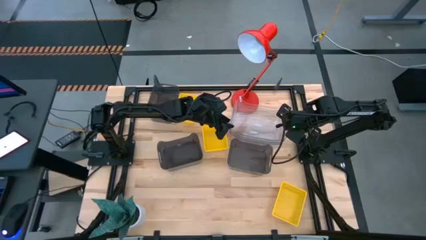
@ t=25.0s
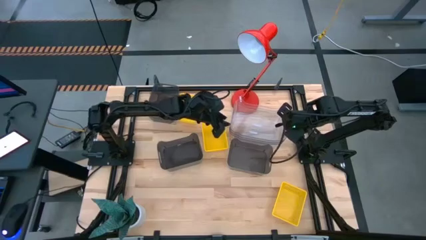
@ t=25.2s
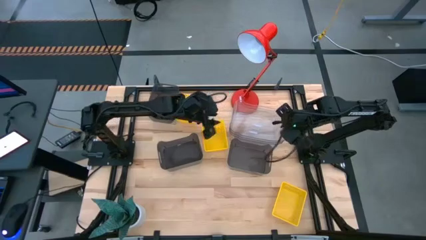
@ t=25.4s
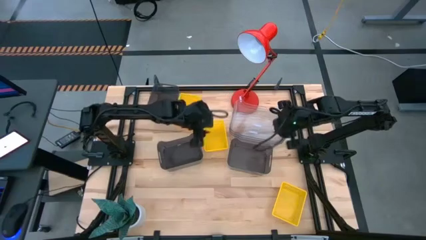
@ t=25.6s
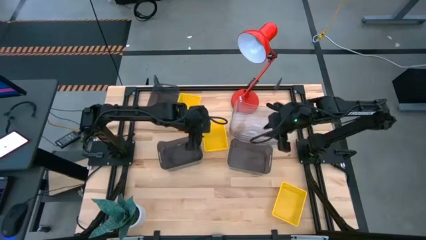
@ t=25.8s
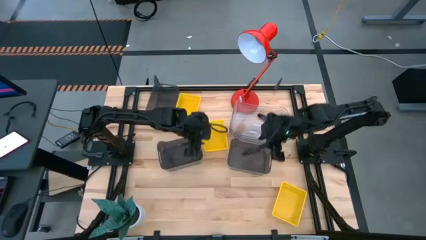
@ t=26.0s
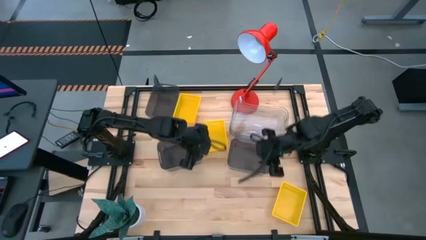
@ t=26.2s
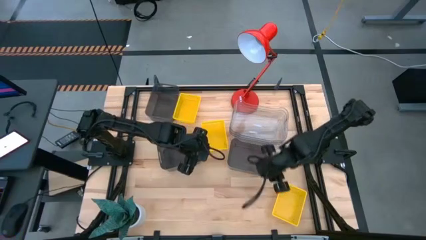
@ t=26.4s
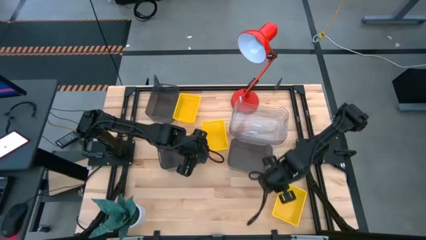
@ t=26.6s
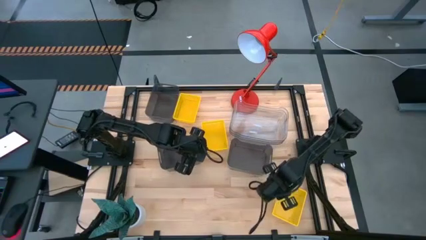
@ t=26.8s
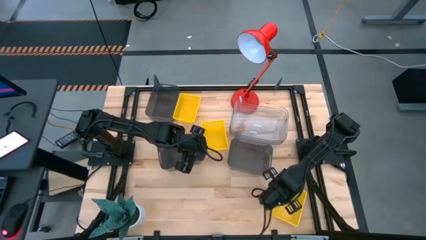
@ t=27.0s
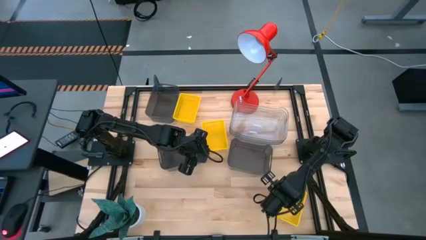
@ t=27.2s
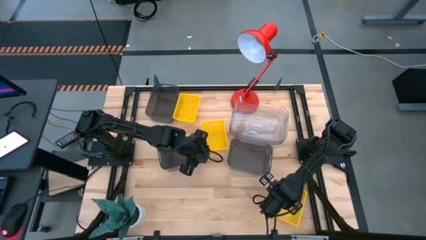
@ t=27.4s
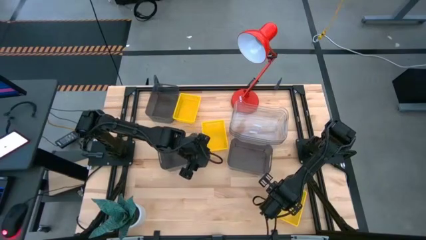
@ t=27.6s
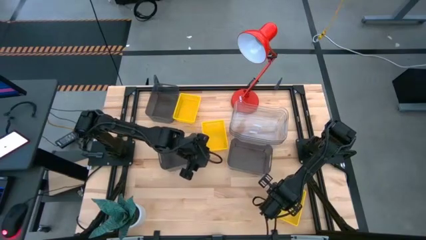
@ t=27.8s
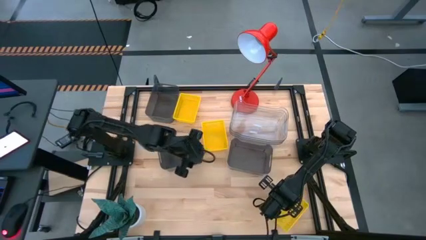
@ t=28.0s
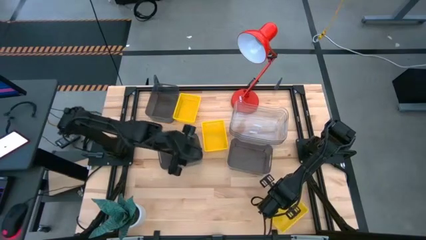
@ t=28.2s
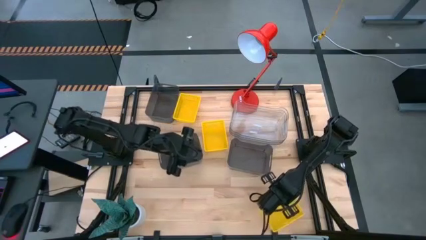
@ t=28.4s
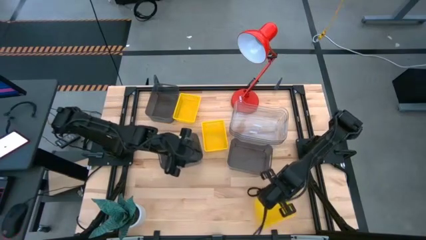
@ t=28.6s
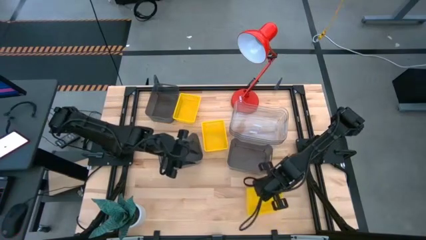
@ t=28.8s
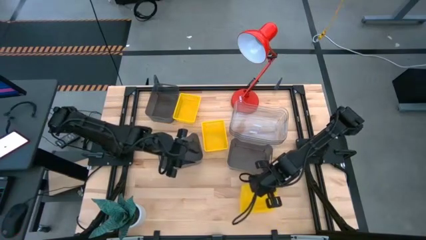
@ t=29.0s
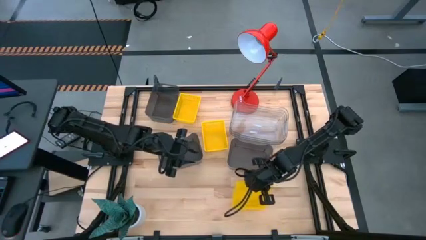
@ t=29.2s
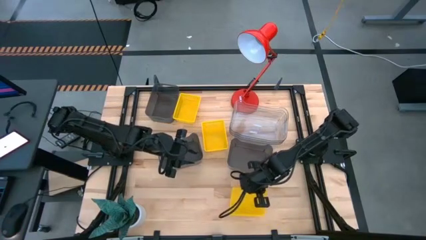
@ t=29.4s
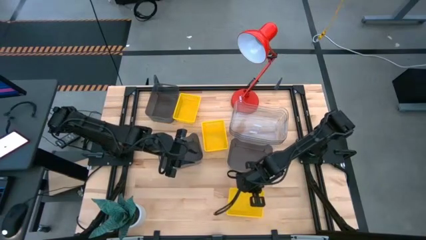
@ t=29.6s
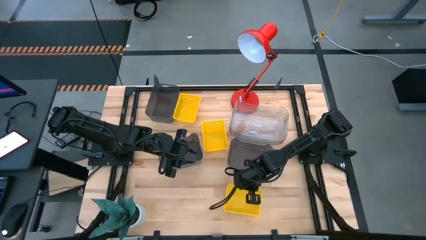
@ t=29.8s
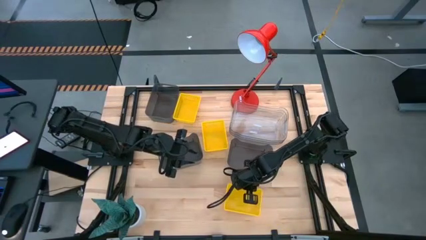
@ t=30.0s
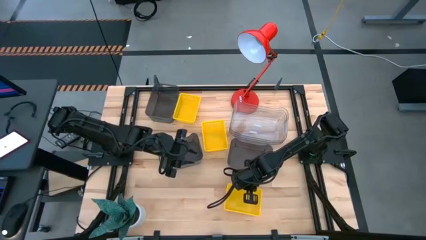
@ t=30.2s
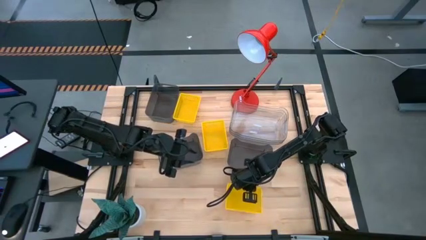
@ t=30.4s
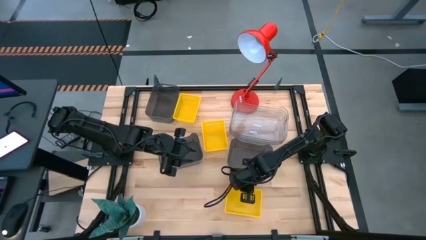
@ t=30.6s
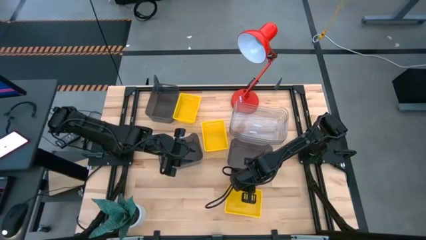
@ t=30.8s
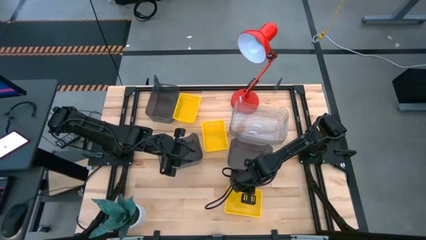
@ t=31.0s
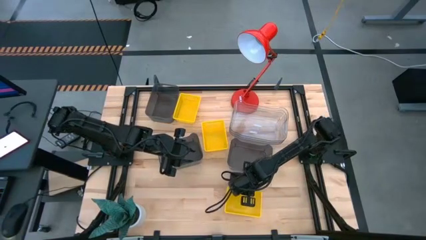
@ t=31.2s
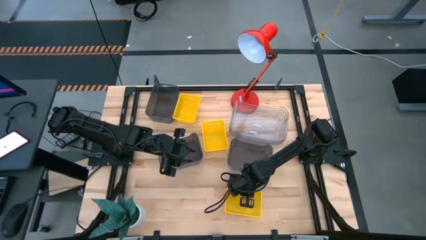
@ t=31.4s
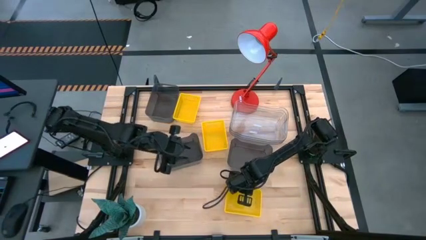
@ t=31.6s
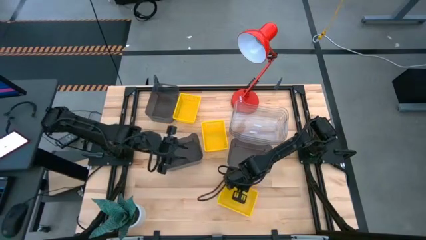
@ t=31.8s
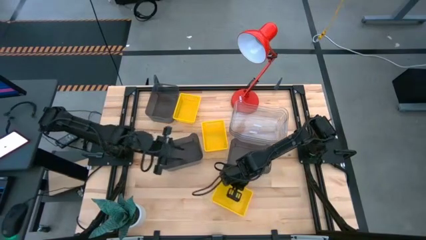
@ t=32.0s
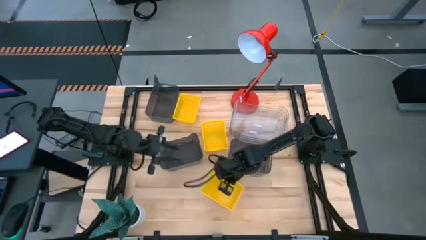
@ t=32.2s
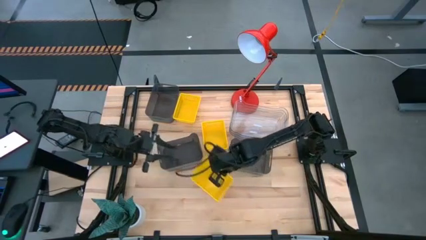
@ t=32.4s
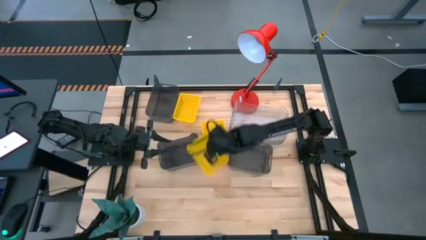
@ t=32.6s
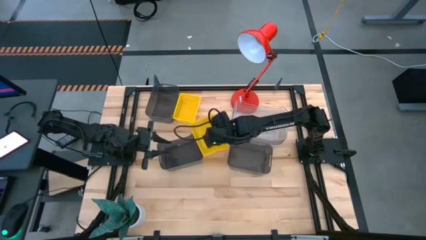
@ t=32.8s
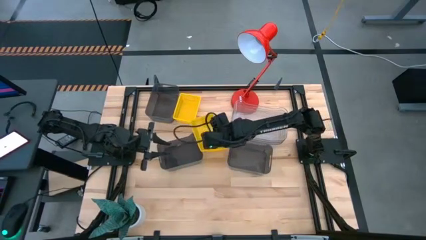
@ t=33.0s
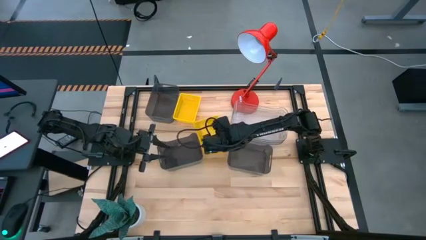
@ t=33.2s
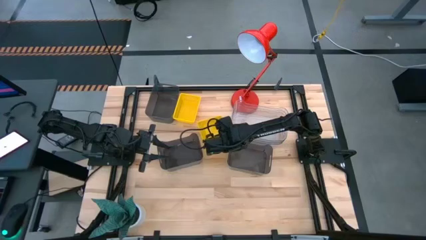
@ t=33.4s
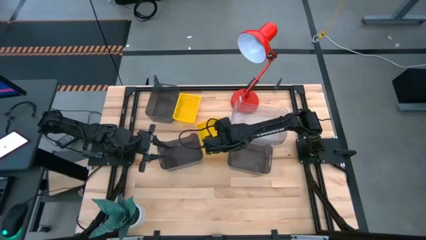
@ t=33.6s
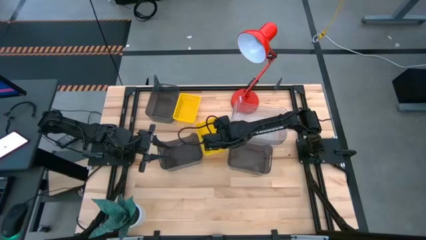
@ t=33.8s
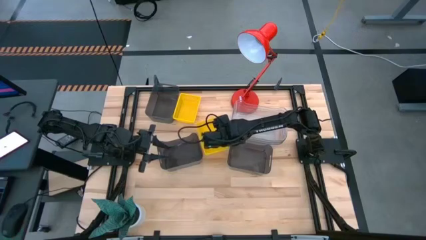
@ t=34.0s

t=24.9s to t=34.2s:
Stack the bottom yellow bin on top of the middle yellow bin

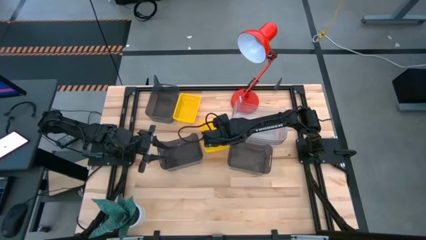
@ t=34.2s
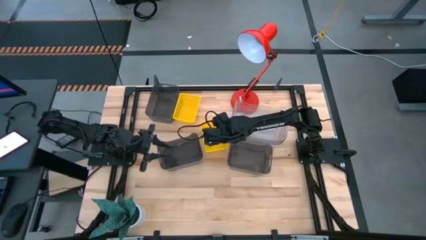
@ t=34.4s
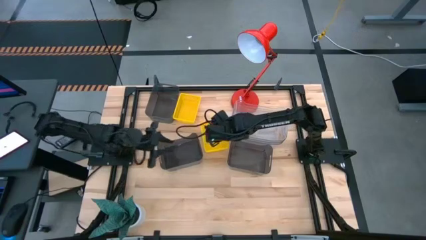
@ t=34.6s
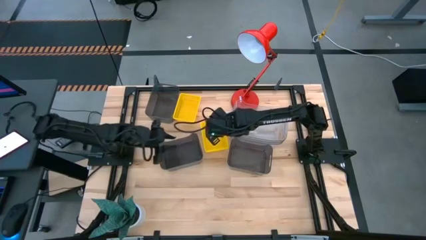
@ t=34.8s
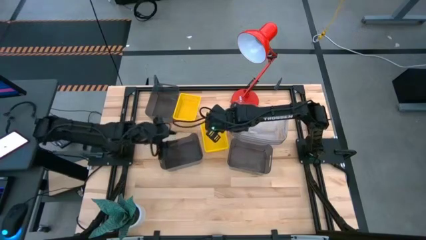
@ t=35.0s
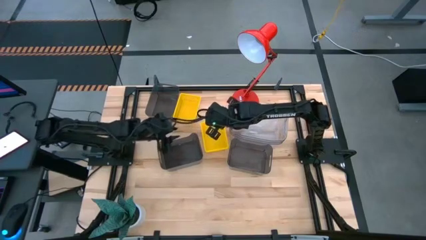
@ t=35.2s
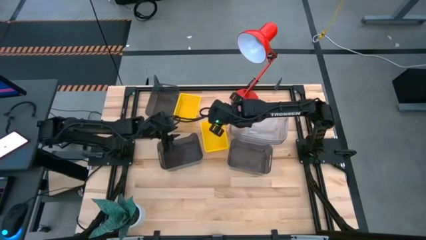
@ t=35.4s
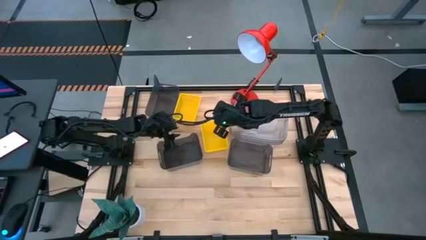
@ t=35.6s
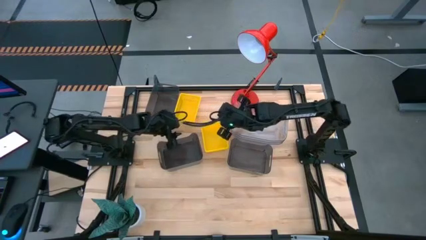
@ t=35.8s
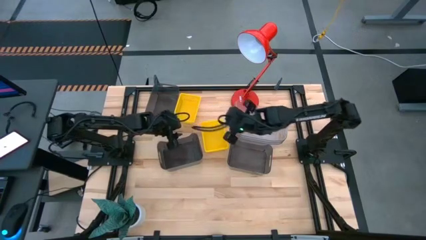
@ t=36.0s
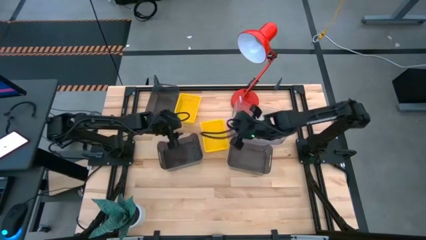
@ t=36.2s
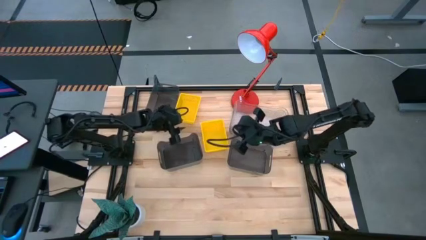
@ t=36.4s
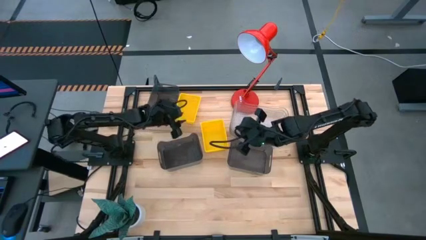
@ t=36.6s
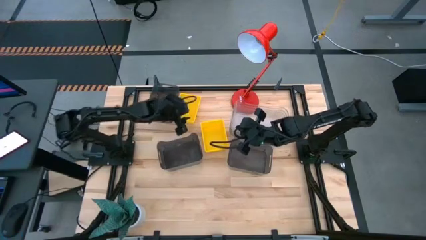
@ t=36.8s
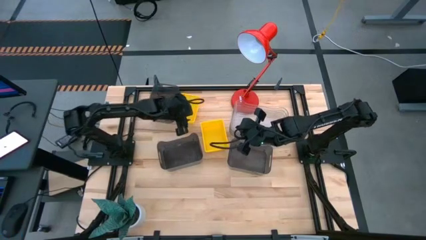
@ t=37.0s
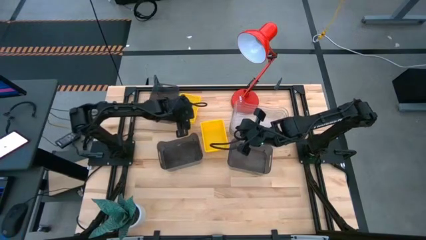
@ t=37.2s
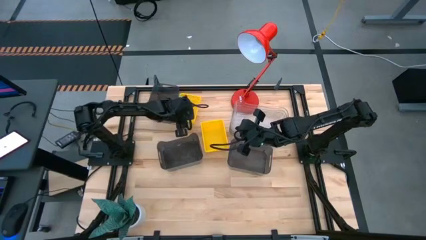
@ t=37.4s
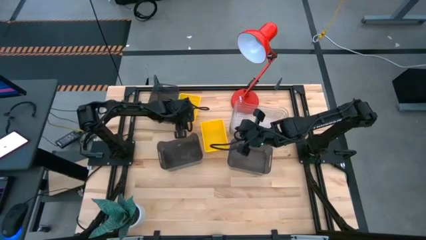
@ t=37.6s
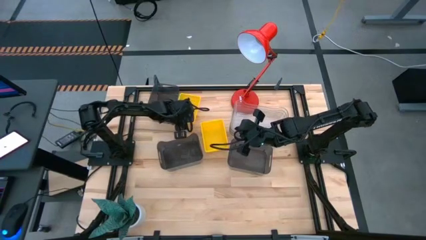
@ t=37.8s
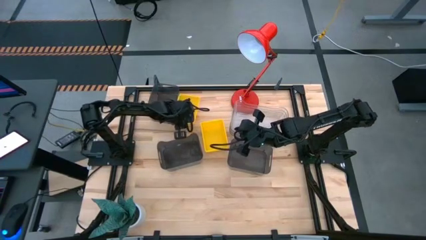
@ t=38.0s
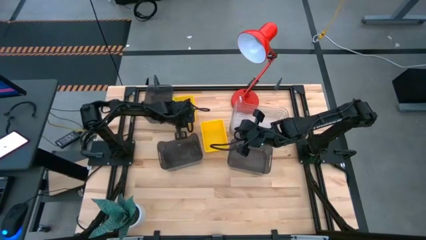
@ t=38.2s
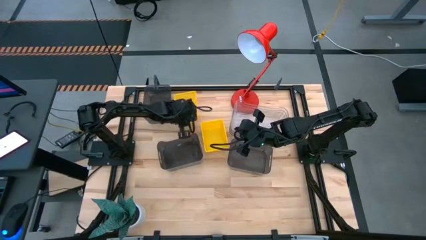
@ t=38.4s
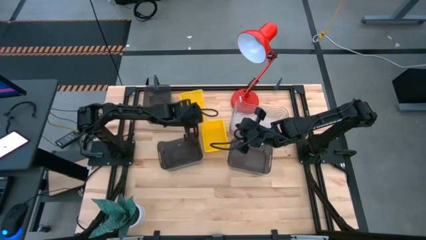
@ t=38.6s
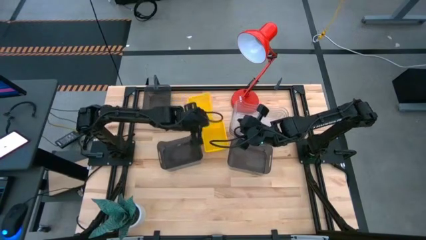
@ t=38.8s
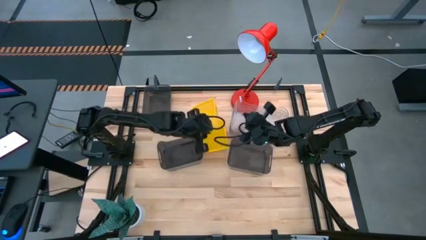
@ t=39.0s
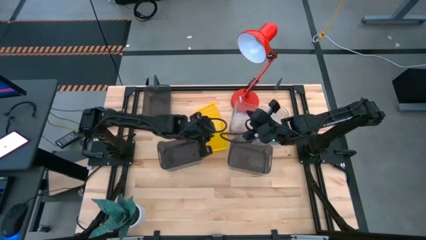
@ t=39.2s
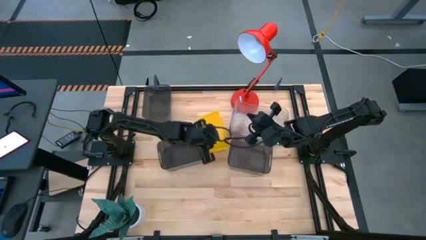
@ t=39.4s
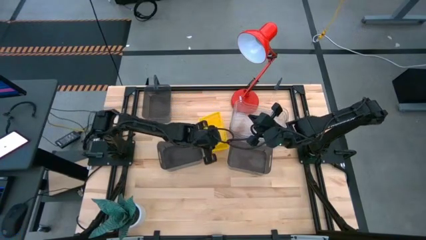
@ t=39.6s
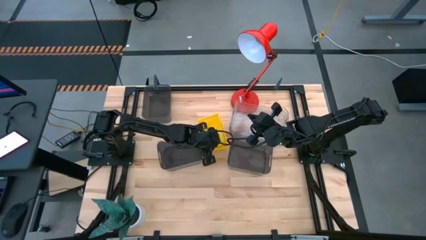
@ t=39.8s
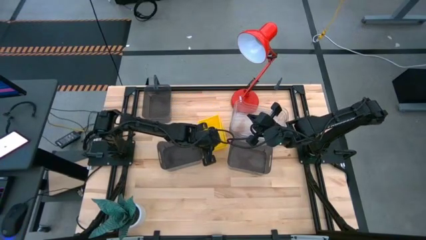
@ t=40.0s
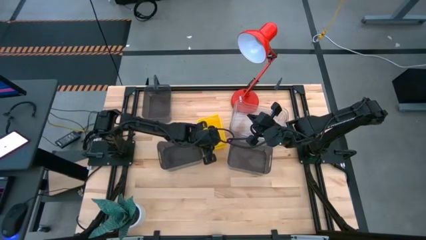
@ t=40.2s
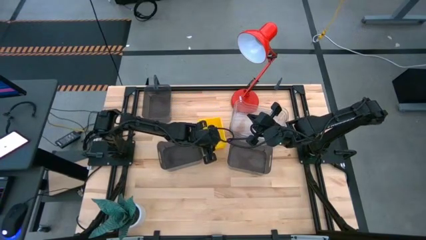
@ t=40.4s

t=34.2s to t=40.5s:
Stack the top yellow bin on top of the bottom yellow bin
